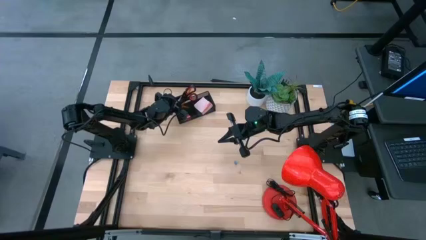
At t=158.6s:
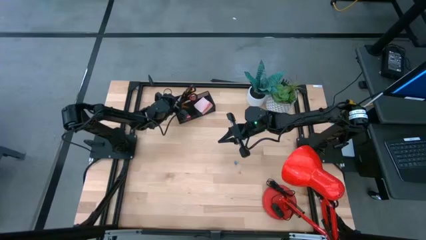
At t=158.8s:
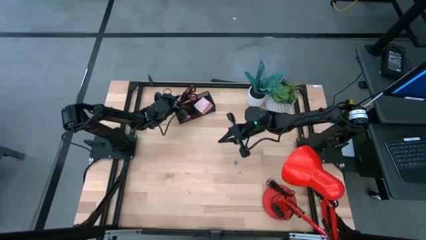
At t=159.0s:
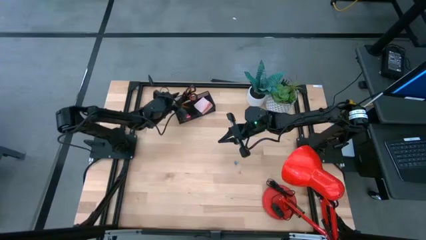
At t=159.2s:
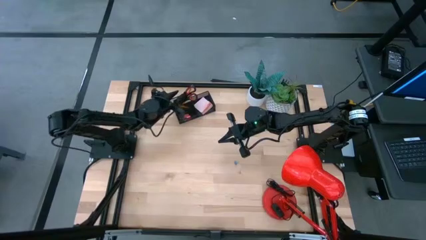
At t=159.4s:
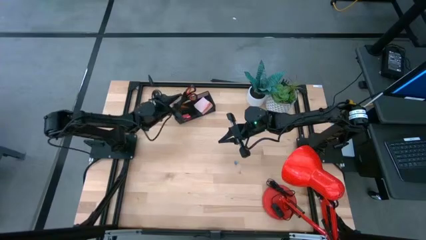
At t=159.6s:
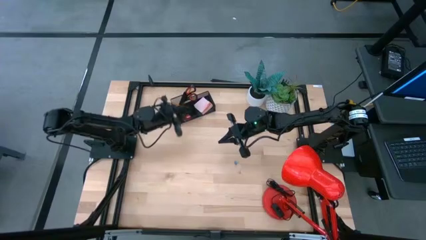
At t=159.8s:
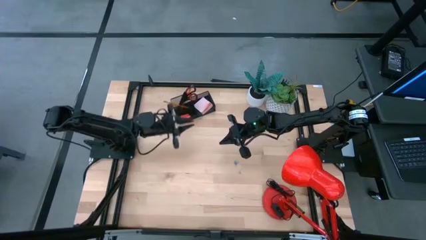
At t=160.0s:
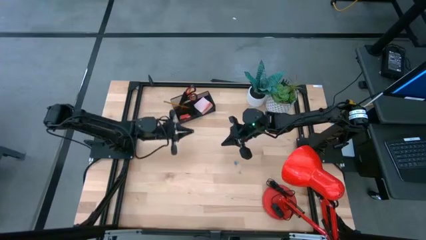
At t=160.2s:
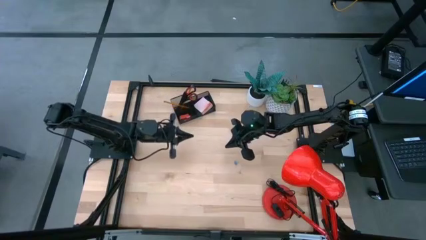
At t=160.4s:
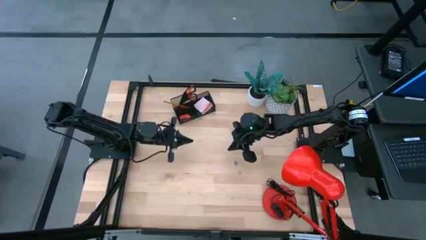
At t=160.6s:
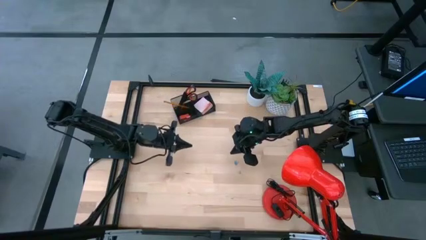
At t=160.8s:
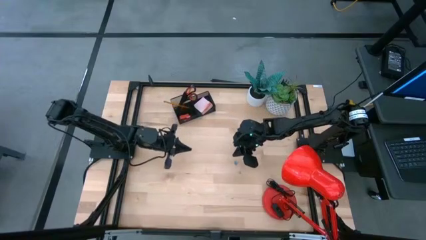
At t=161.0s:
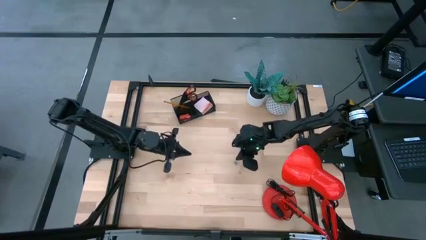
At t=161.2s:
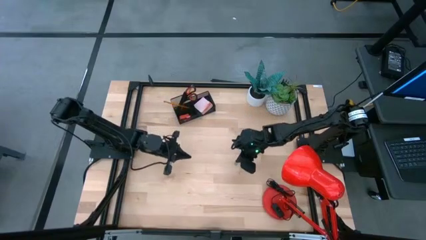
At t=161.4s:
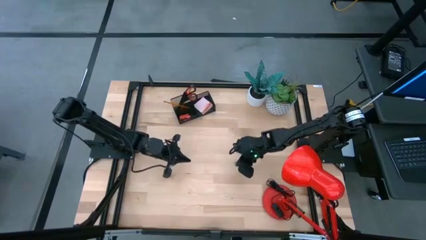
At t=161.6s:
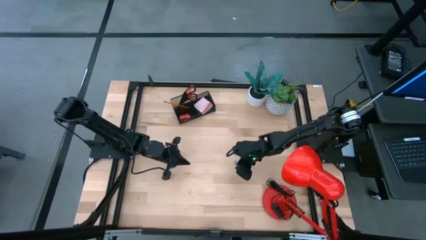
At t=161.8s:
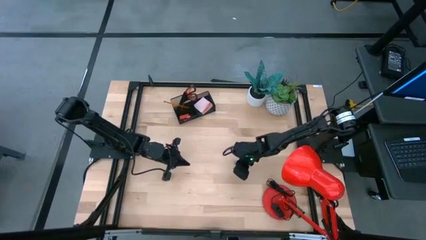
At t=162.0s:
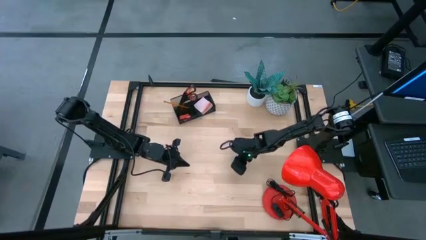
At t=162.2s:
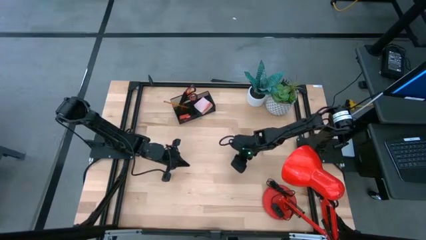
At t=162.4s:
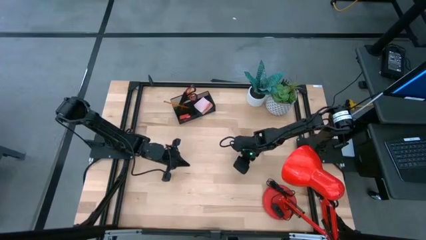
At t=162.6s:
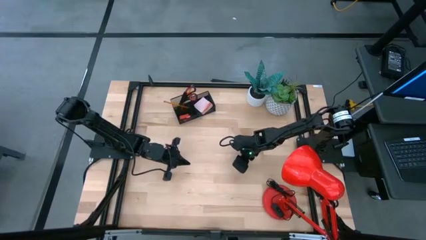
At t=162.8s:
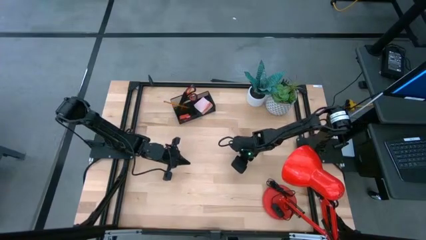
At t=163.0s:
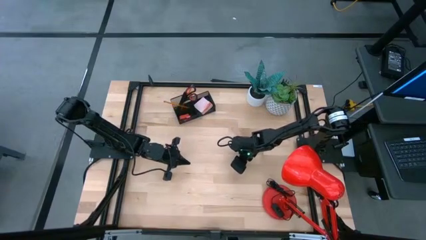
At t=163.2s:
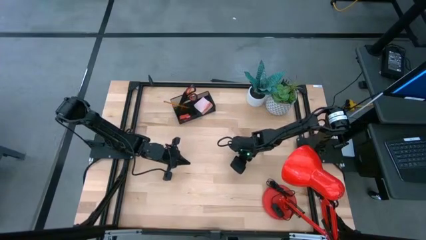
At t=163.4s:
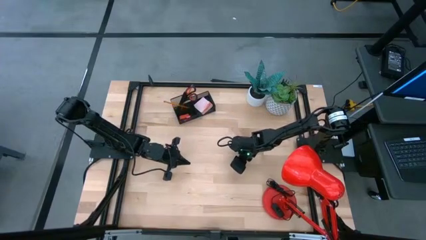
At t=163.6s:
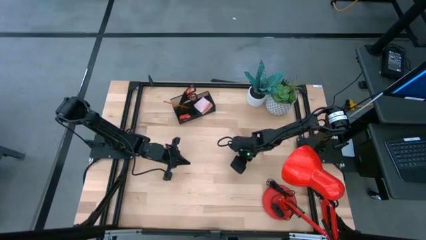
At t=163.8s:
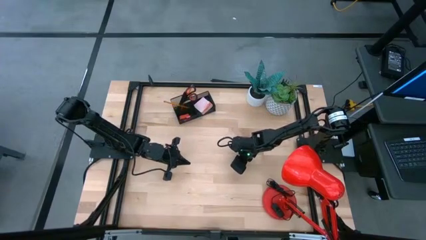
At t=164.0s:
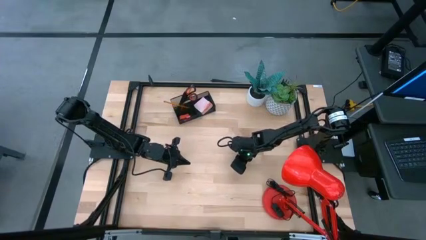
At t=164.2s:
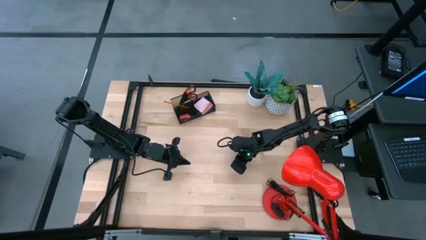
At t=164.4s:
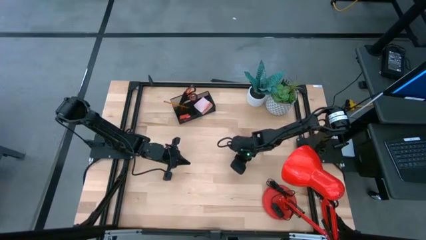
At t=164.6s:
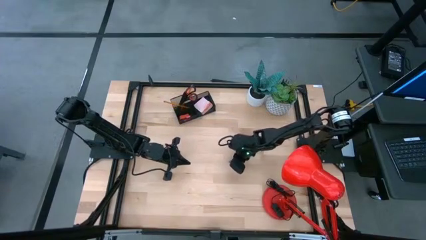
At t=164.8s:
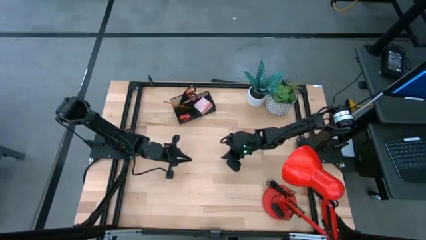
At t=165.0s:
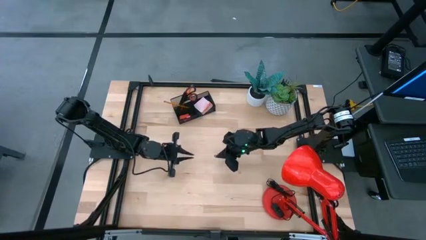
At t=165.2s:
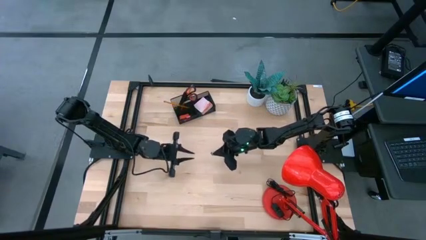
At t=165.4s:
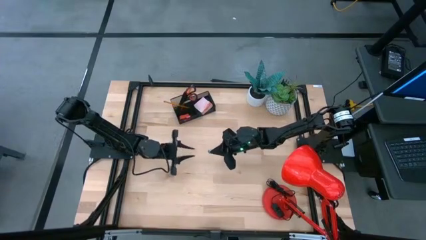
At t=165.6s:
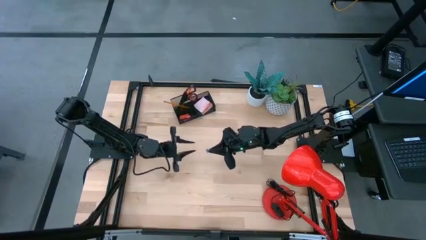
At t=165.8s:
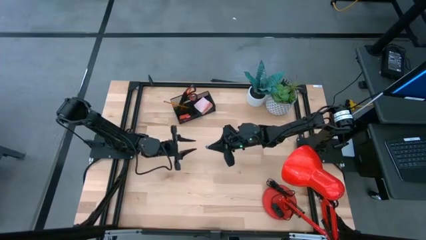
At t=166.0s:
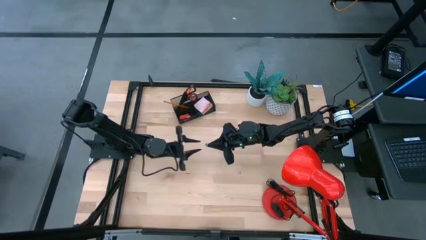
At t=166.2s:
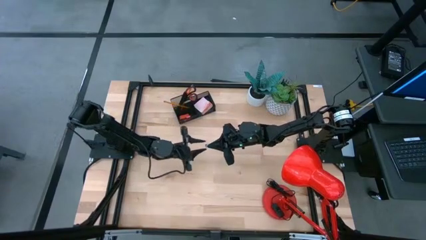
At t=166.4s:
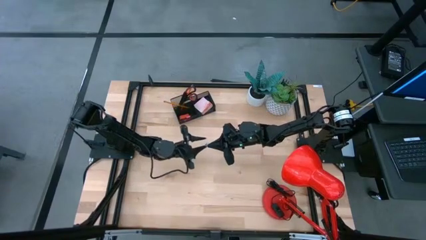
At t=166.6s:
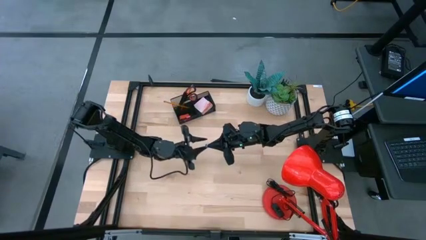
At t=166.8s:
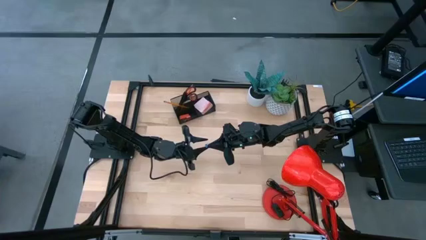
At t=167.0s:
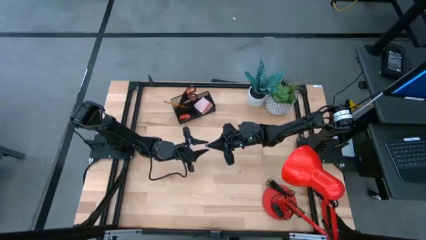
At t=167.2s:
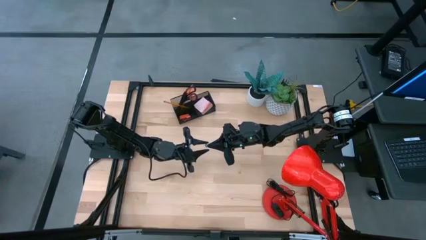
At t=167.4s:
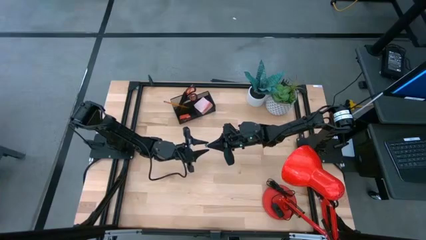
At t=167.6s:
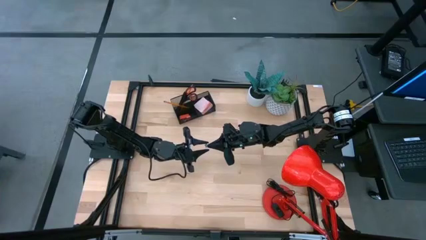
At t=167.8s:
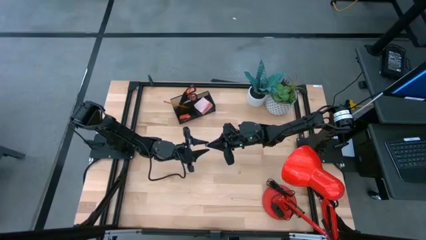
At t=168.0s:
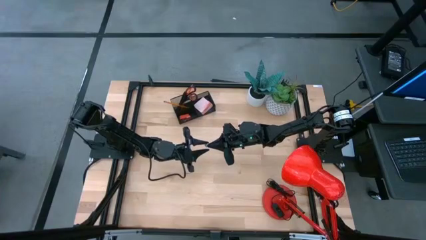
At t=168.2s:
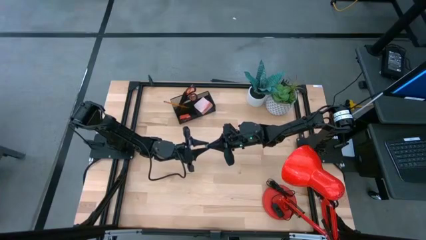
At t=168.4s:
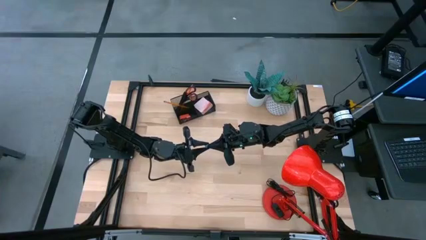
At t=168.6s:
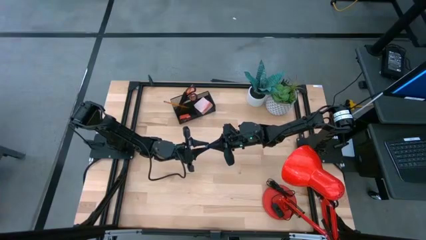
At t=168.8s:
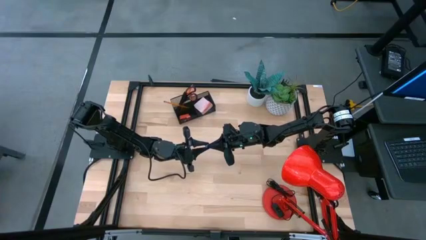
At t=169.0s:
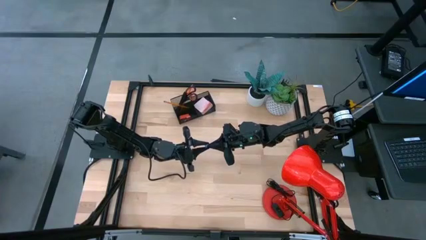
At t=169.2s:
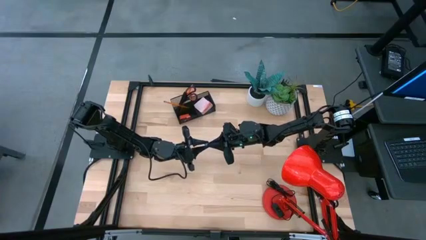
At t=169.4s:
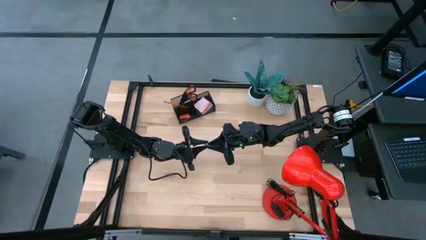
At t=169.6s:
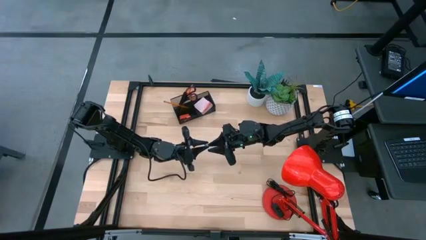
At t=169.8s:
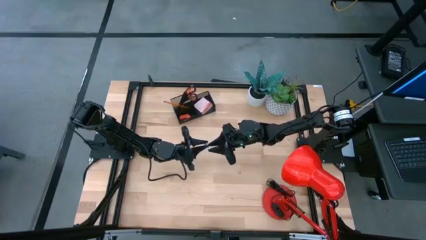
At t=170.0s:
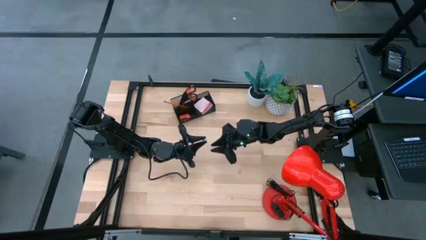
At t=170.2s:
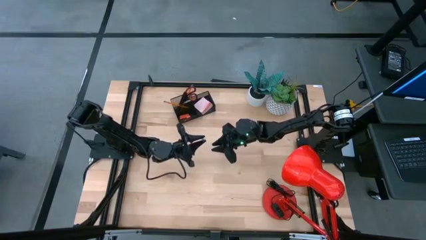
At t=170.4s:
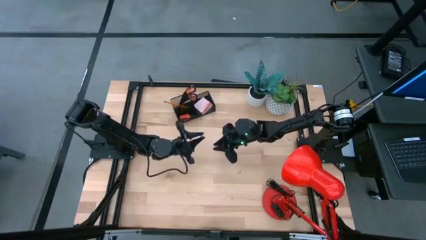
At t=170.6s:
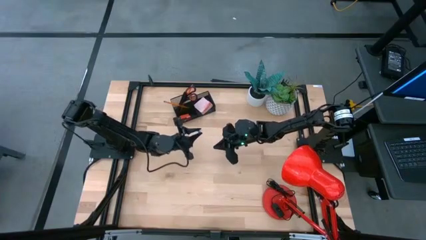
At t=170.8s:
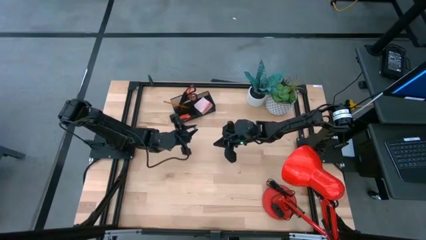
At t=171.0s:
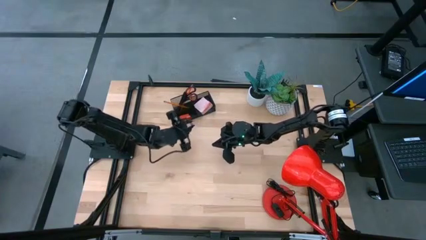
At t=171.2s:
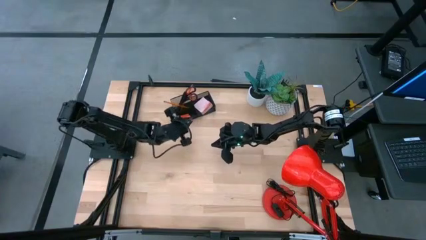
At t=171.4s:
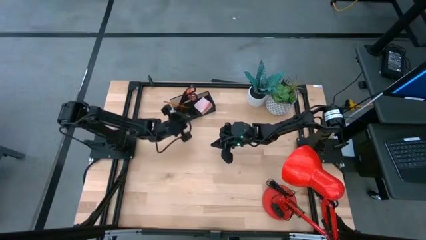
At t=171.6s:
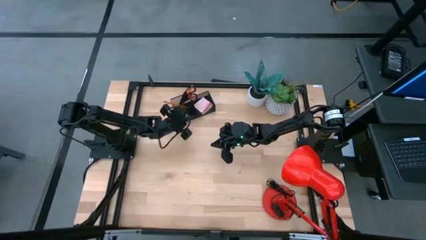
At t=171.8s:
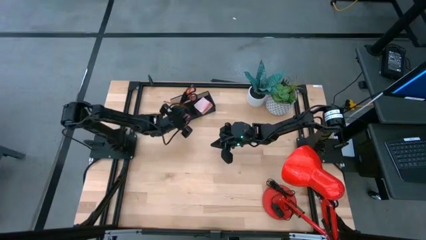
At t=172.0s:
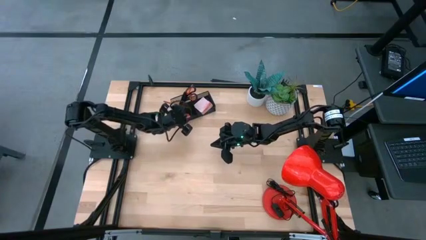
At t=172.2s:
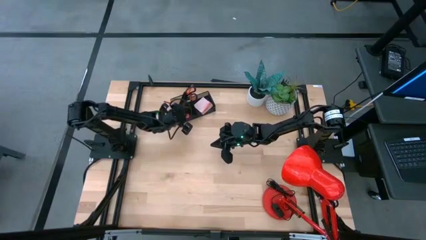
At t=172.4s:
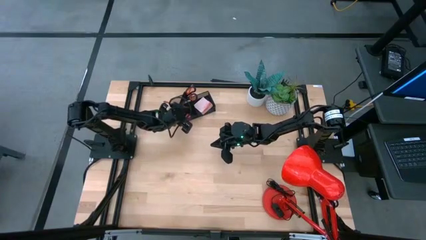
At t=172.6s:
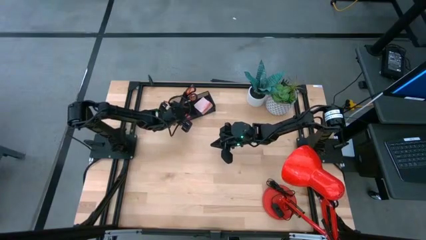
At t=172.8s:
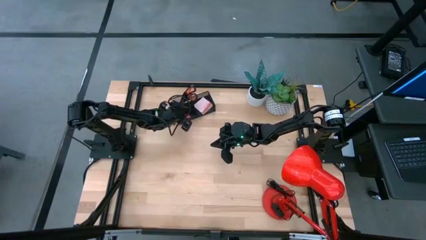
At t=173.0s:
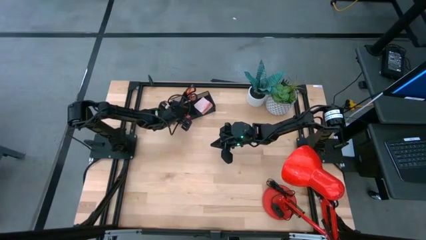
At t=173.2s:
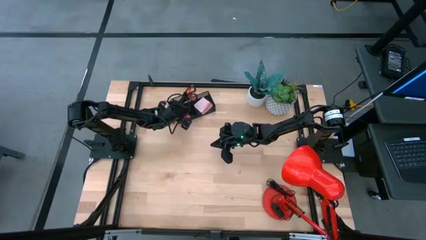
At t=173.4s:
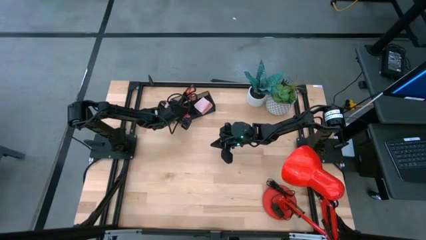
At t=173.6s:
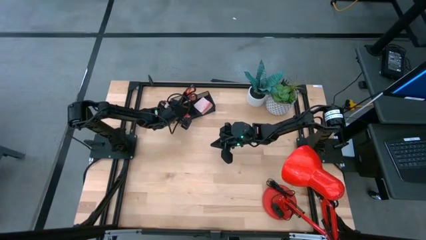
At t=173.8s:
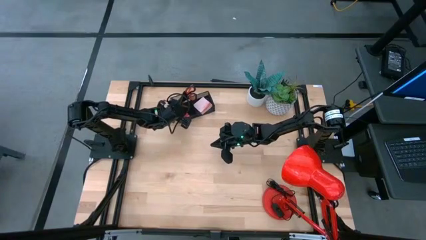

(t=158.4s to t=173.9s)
Task: Pick and place office supplies into organizer
Put the blue binder clip into the desk organizer
